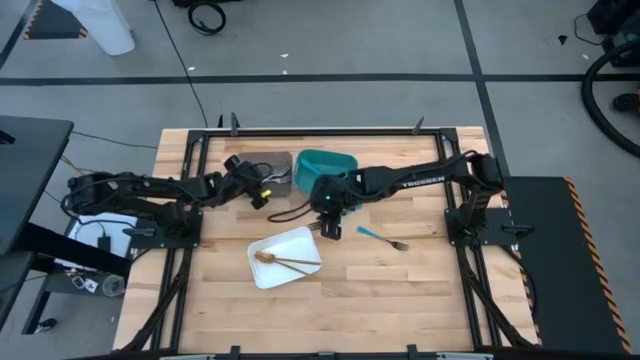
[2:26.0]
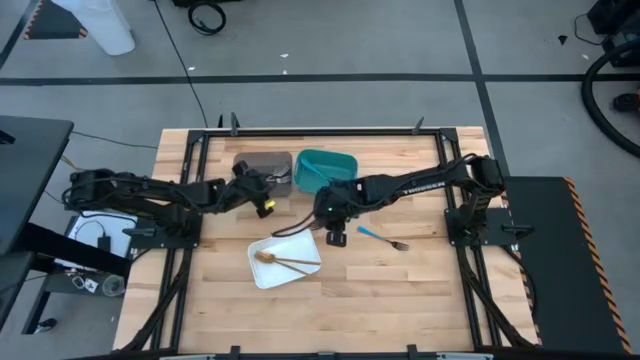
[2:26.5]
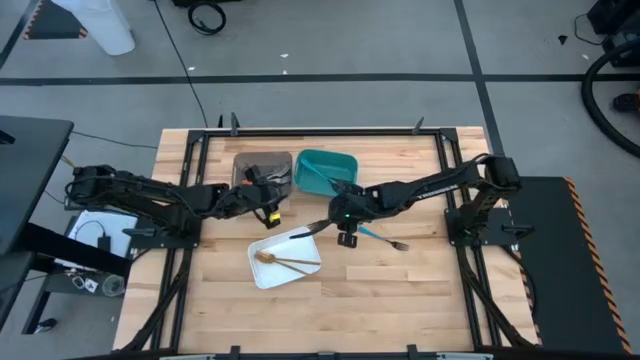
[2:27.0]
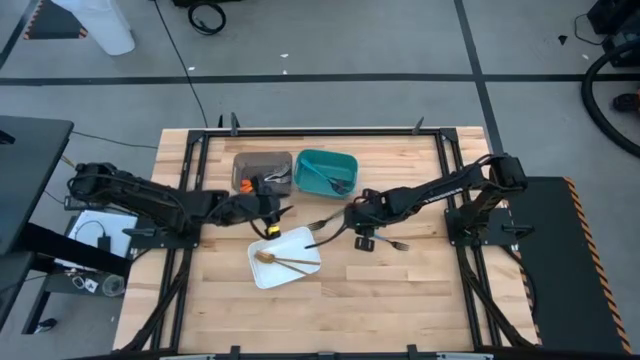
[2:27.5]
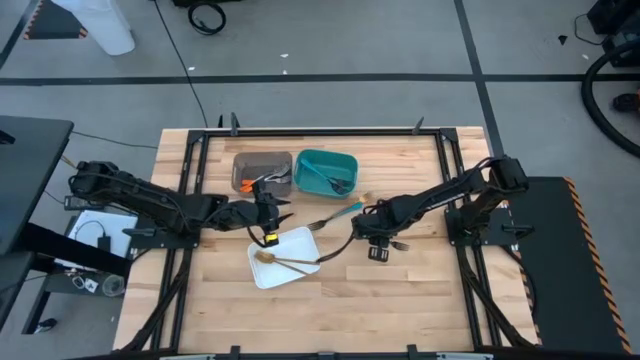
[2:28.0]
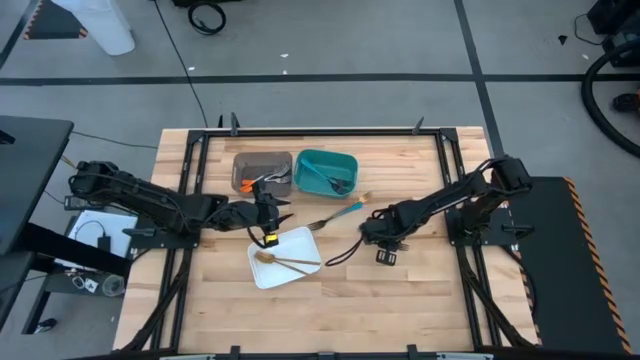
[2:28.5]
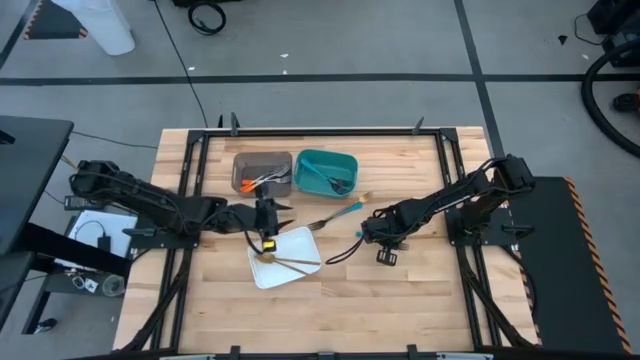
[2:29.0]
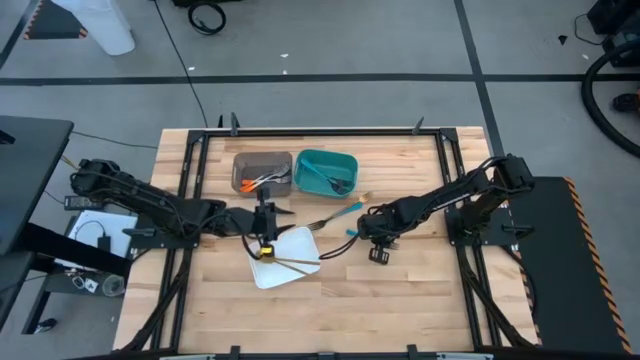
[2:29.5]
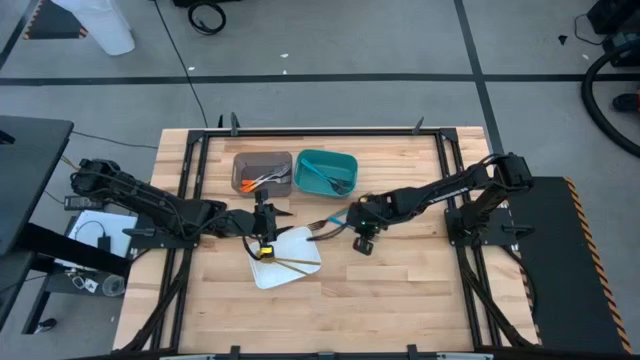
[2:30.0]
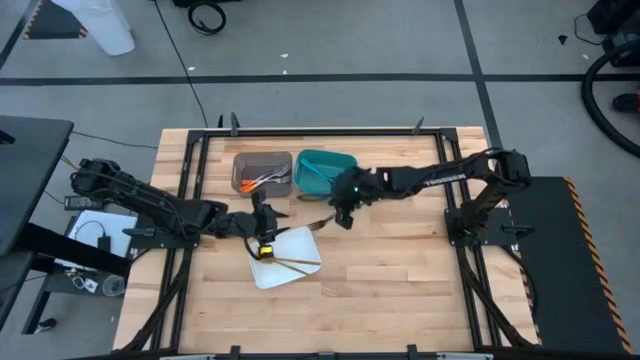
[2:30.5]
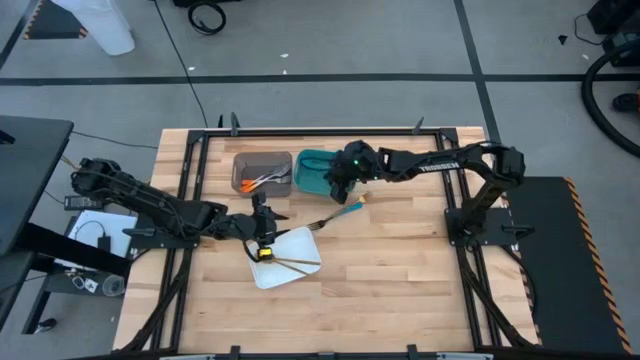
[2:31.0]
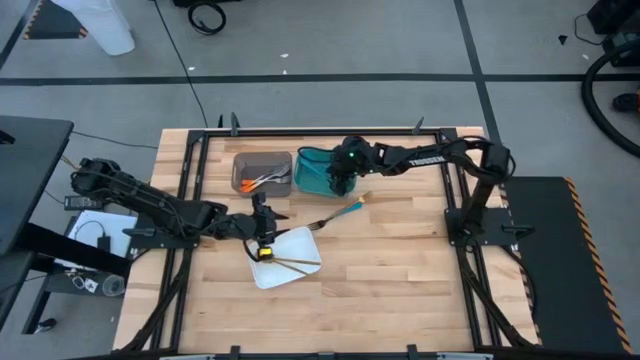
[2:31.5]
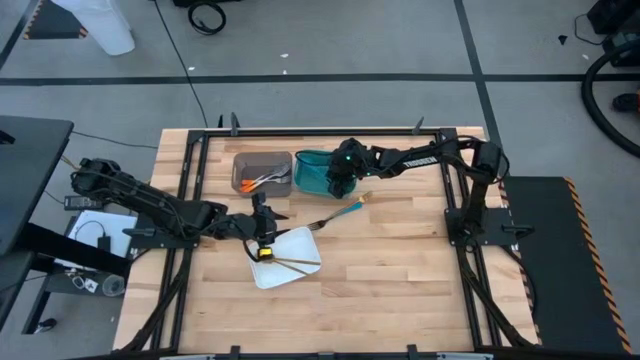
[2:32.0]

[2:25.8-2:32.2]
Task: Sort silverware by color (type)
Put the blue fork into the blue bin

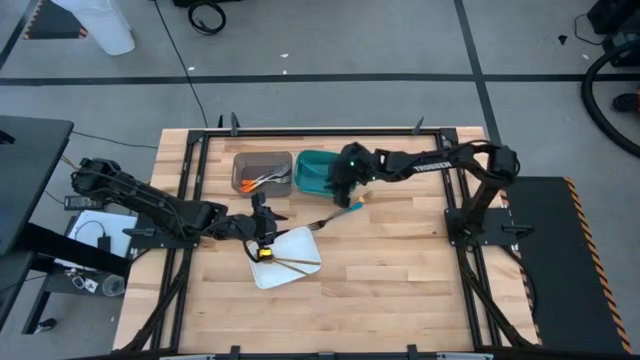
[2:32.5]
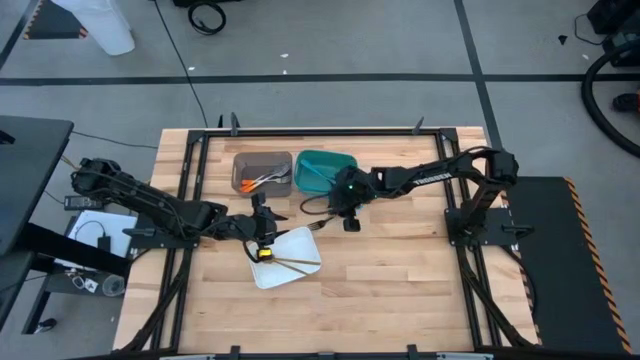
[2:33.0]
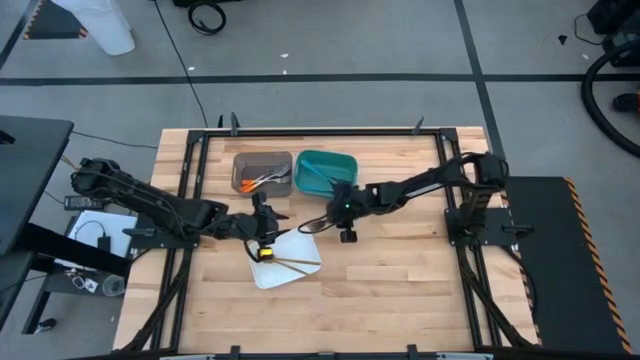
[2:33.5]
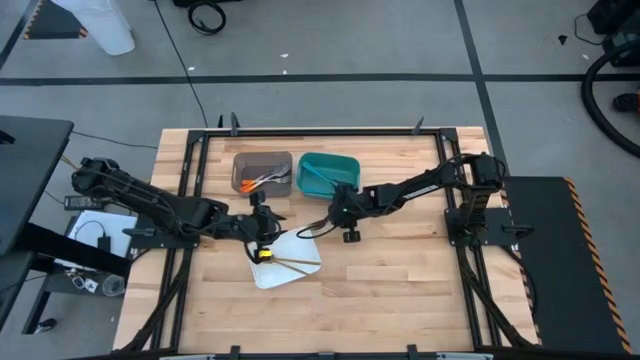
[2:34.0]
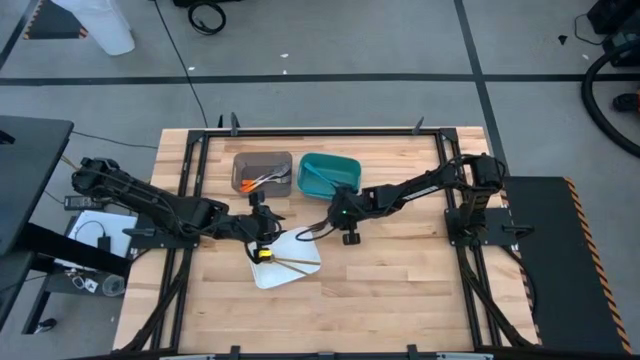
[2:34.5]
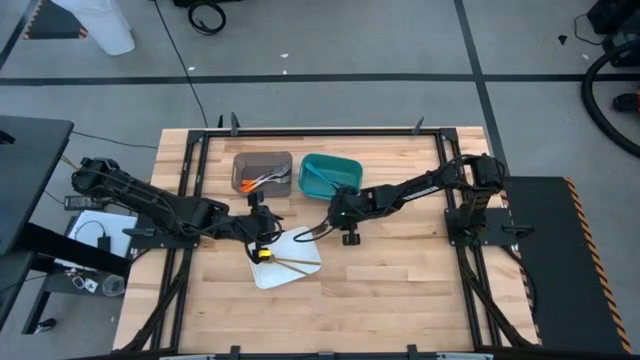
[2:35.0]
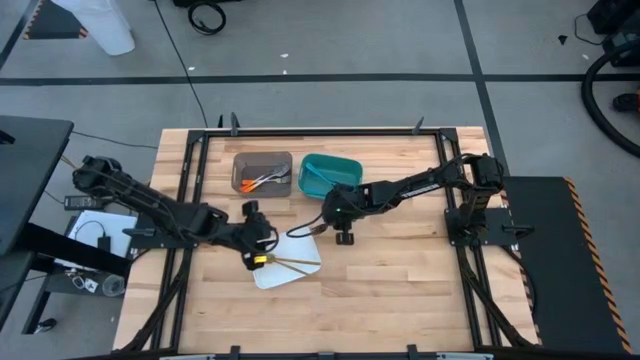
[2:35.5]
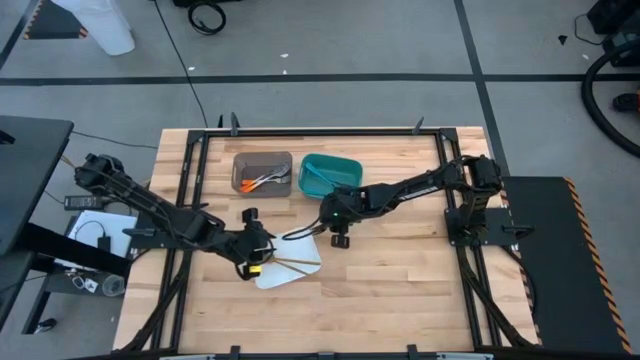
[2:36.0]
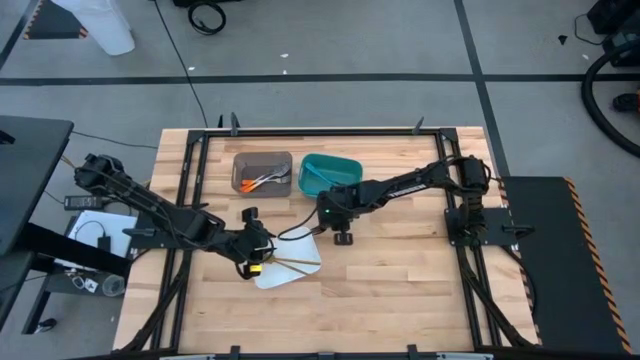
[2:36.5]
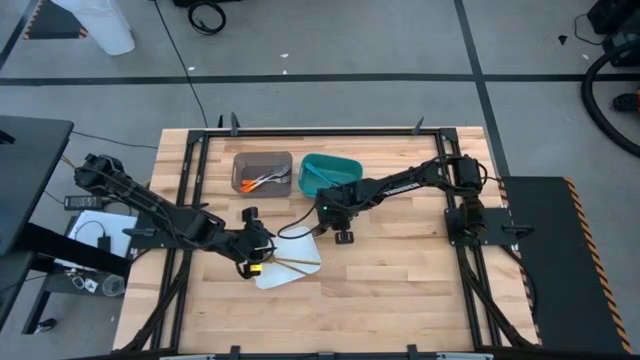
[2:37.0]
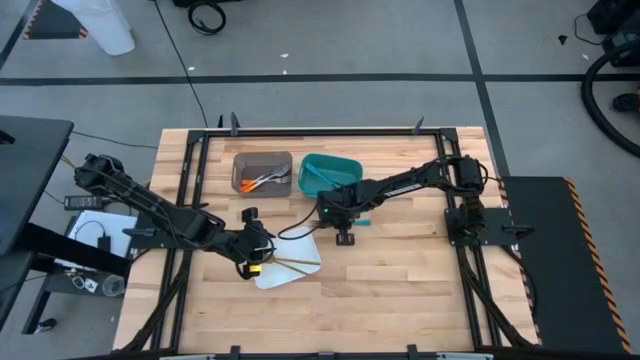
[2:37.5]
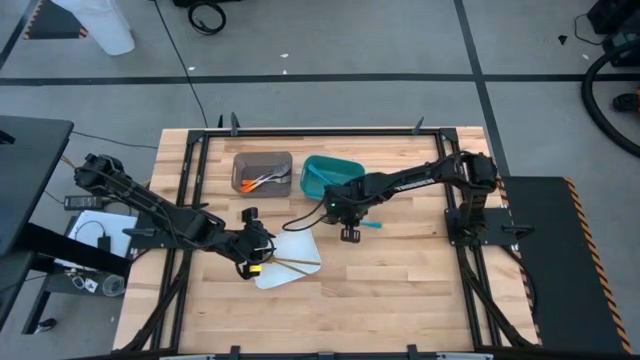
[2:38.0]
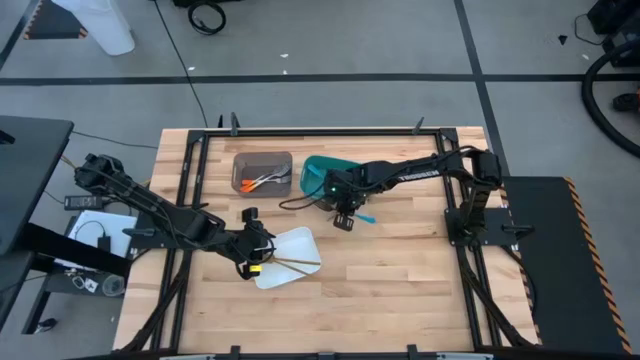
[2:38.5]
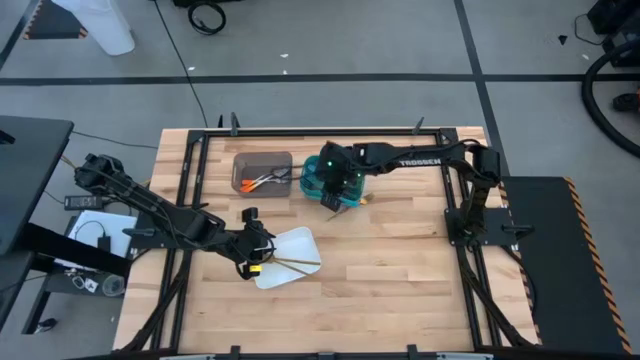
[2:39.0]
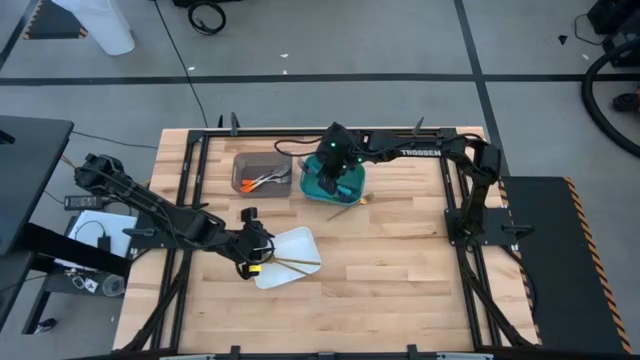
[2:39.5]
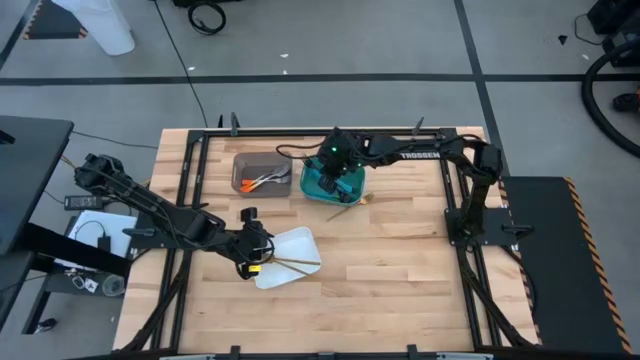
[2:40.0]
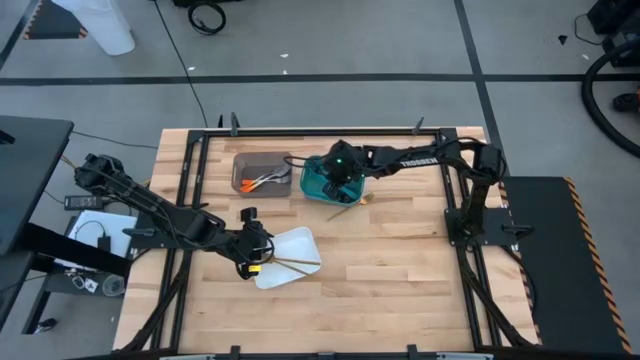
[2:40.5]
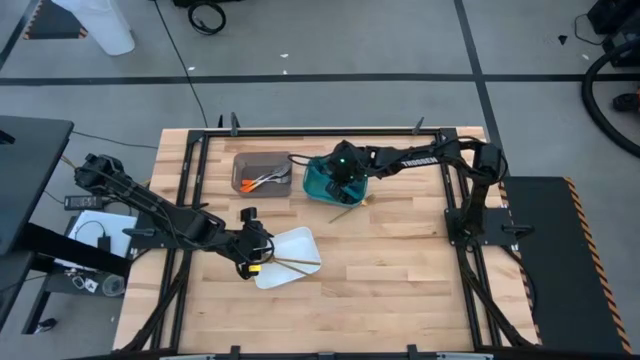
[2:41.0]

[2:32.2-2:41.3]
Put the blue fork into the white bin

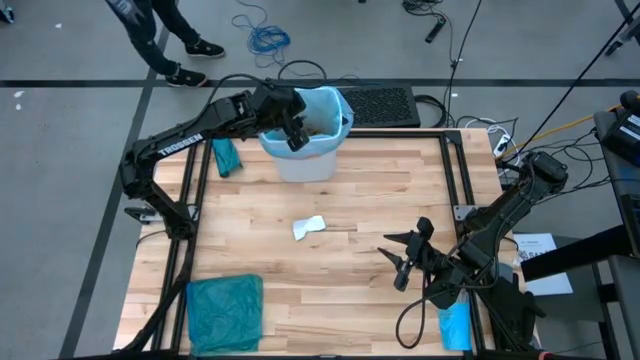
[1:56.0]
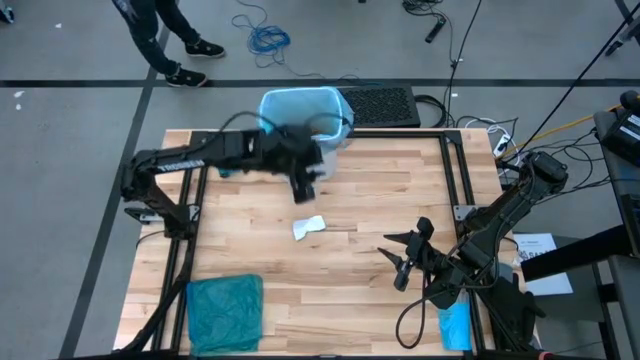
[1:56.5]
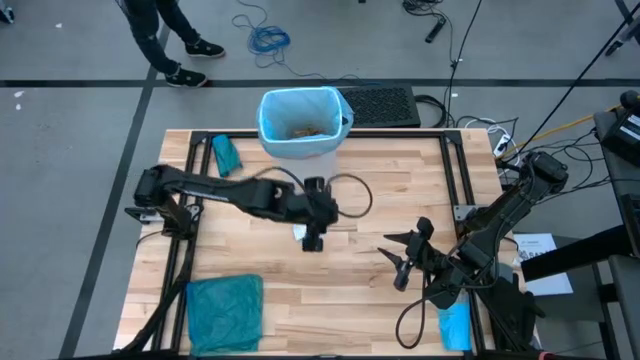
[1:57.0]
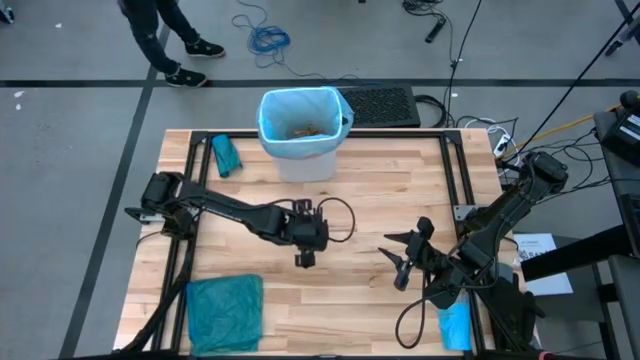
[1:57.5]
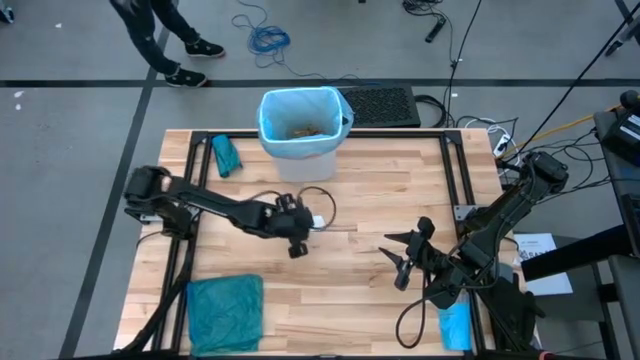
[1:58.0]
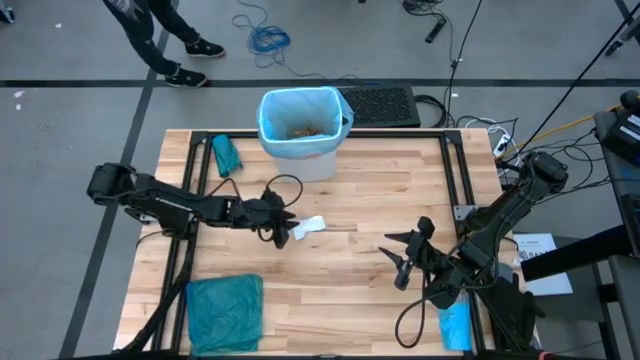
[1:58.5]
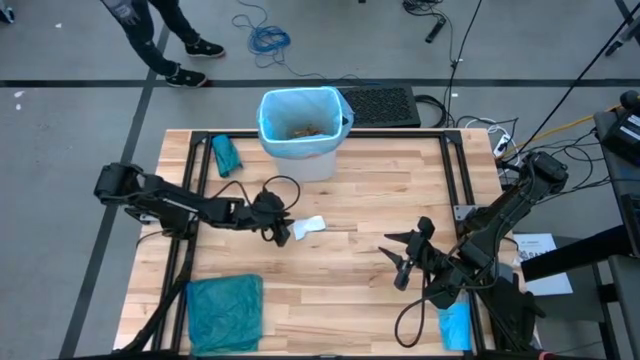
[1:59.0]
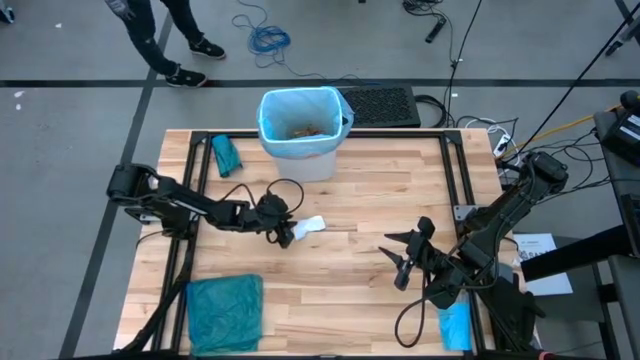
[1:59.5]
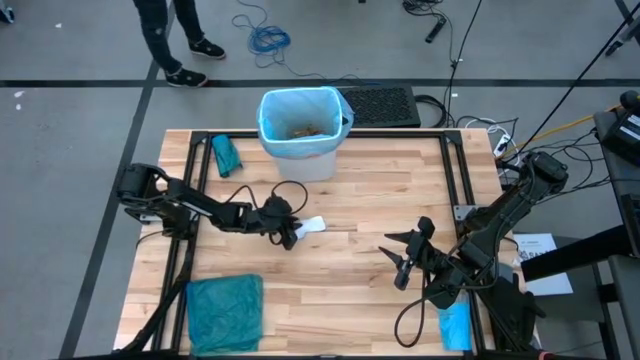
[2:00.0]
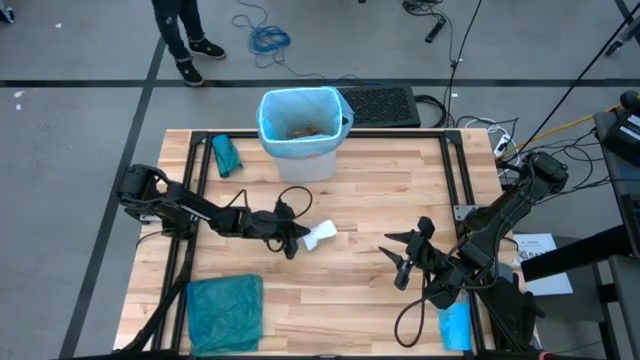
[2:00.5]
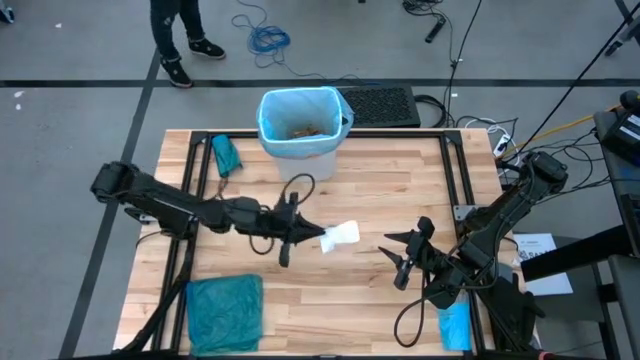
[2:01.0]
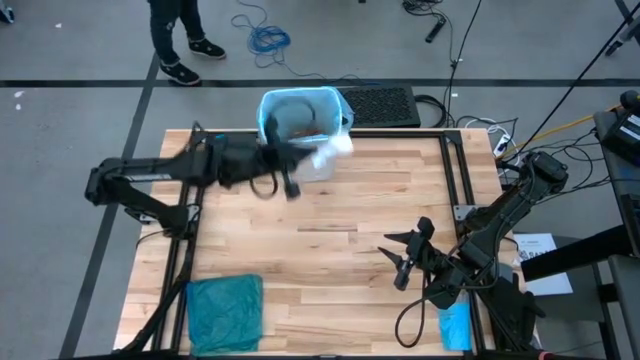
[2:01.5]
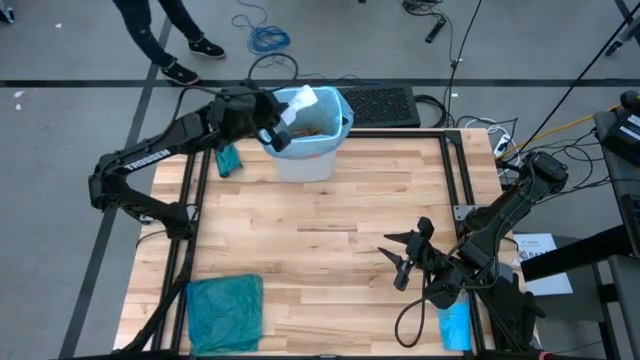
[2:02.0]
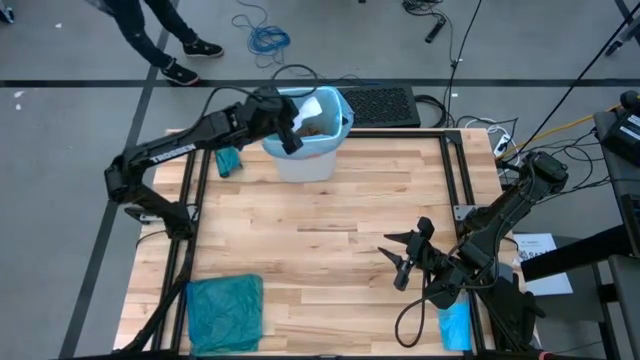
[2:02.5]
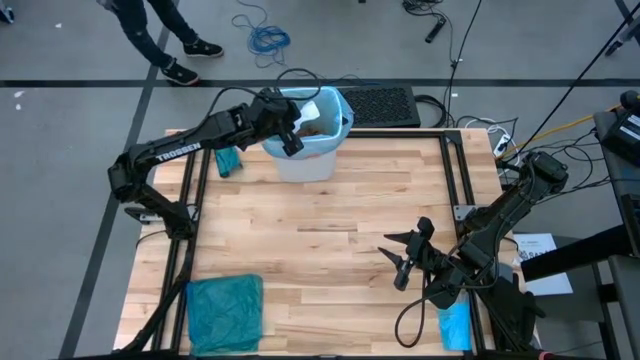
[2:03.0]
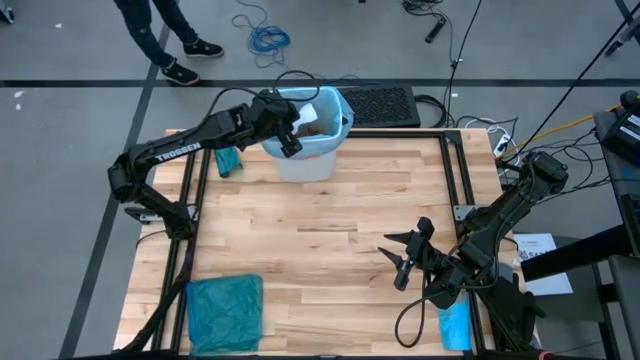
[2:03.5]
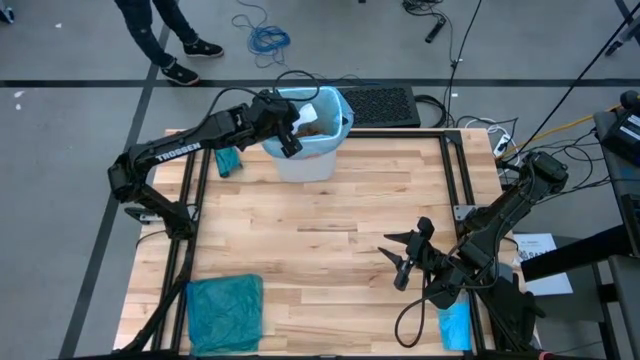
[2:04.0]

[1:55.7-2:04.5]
Task: place trash/remove bag and relplace
Put the white paper into the blue trash bag inside the white trash bin
